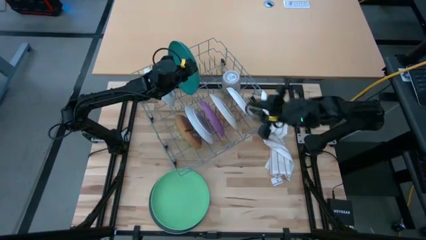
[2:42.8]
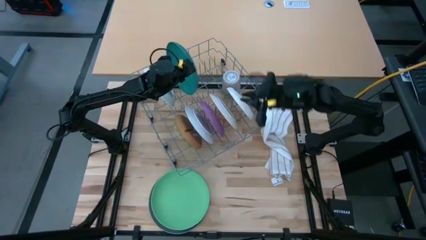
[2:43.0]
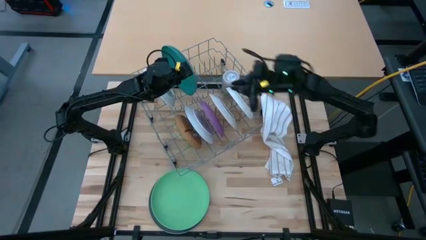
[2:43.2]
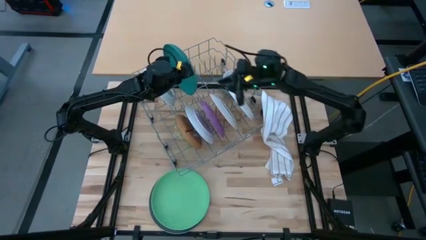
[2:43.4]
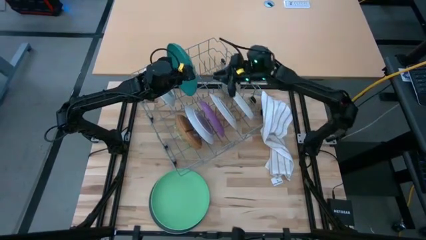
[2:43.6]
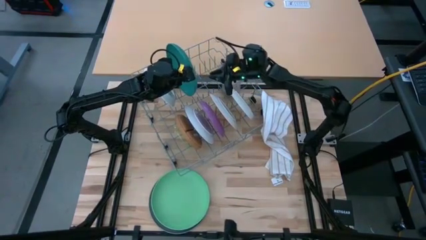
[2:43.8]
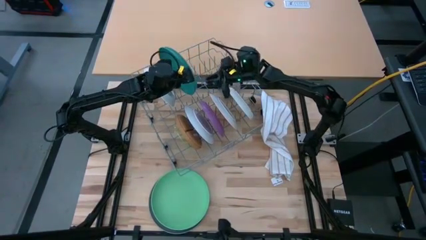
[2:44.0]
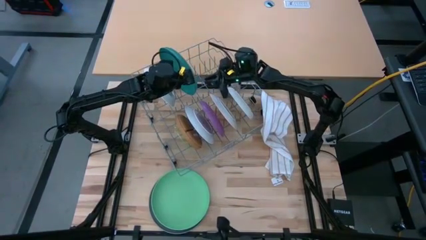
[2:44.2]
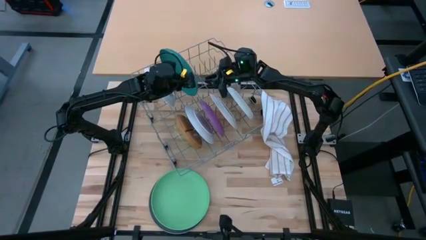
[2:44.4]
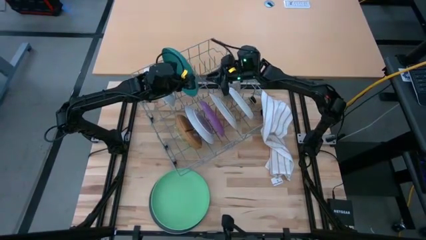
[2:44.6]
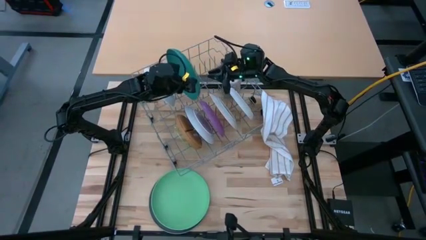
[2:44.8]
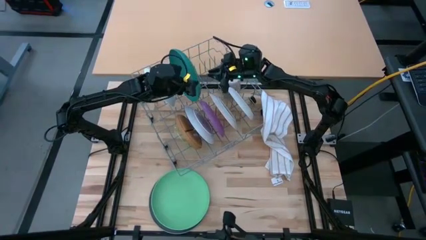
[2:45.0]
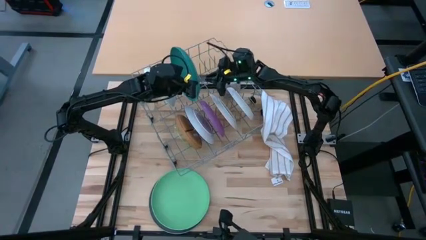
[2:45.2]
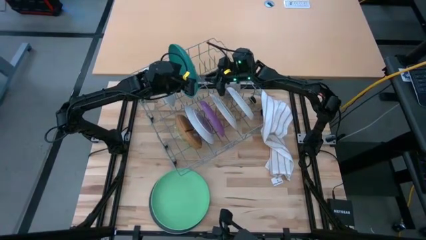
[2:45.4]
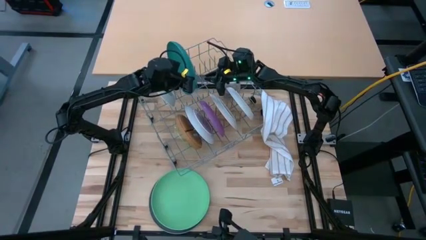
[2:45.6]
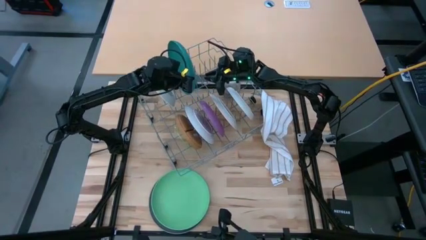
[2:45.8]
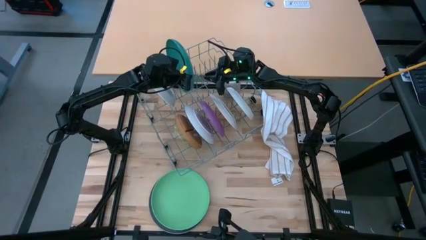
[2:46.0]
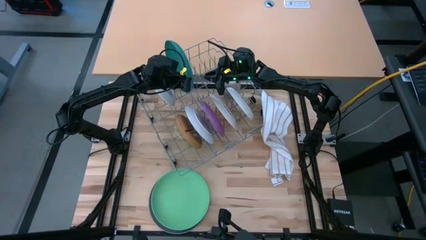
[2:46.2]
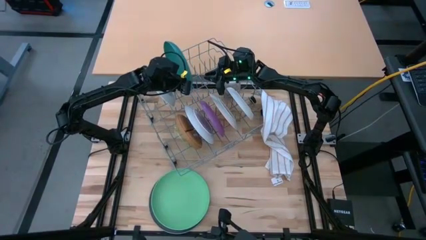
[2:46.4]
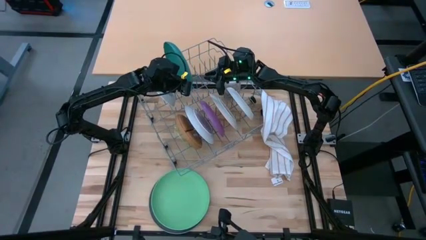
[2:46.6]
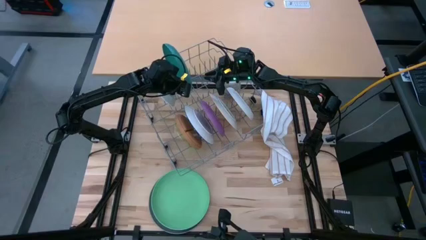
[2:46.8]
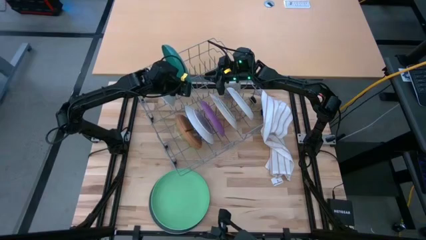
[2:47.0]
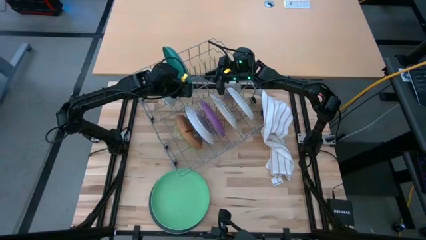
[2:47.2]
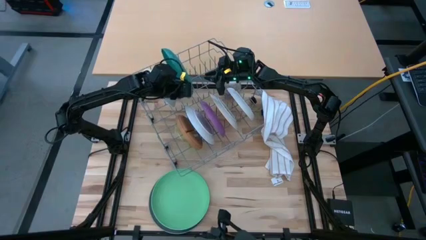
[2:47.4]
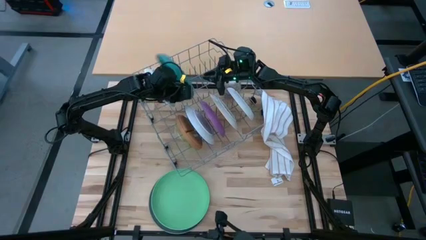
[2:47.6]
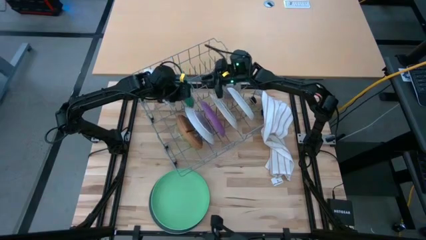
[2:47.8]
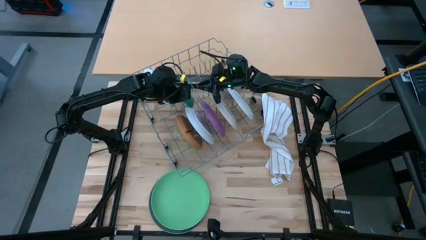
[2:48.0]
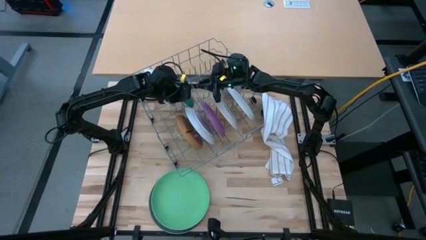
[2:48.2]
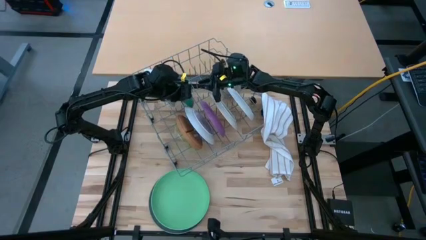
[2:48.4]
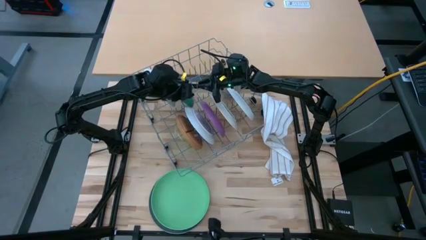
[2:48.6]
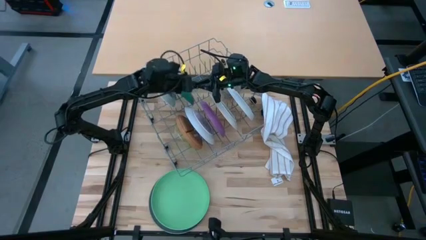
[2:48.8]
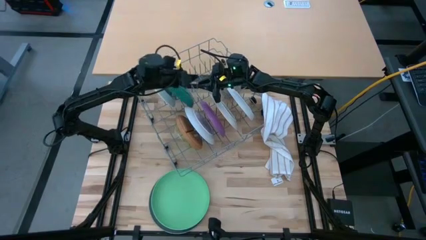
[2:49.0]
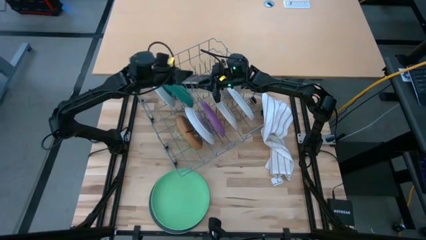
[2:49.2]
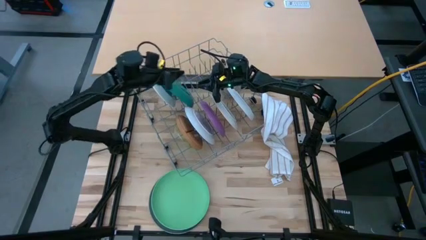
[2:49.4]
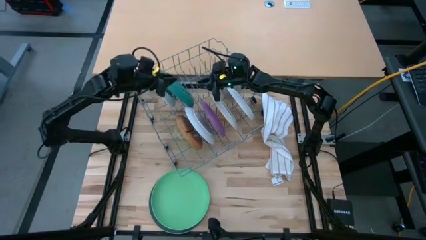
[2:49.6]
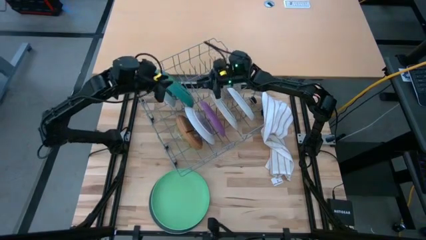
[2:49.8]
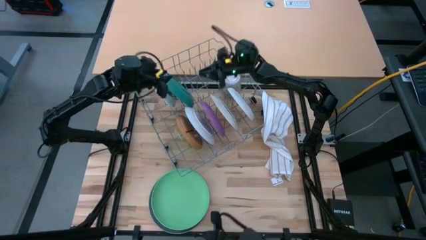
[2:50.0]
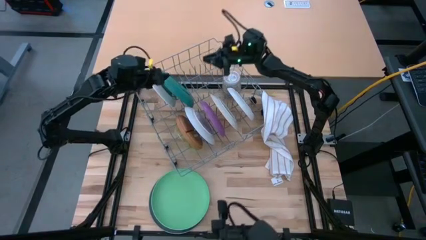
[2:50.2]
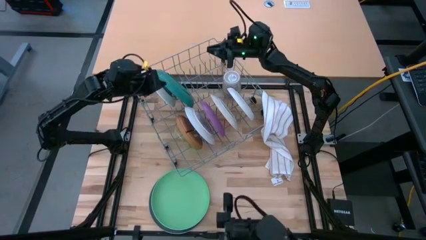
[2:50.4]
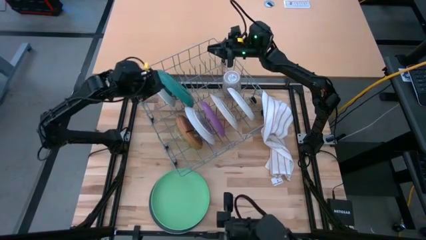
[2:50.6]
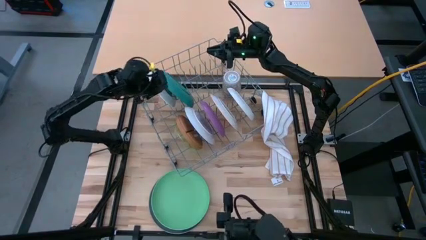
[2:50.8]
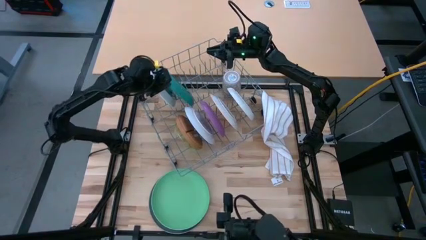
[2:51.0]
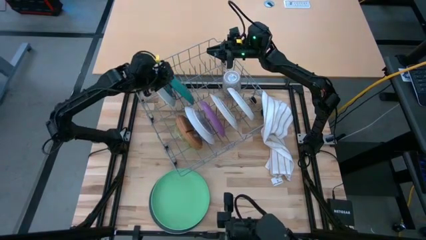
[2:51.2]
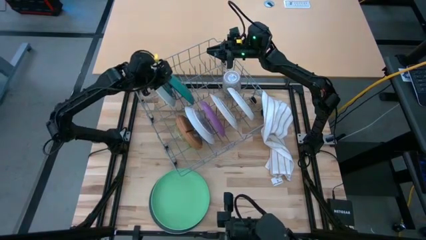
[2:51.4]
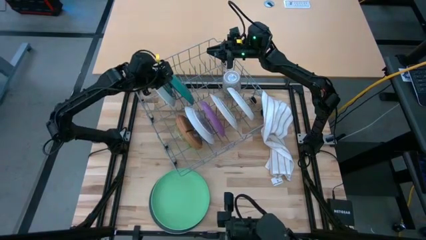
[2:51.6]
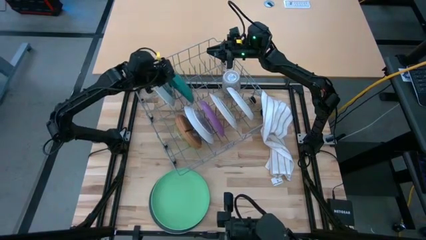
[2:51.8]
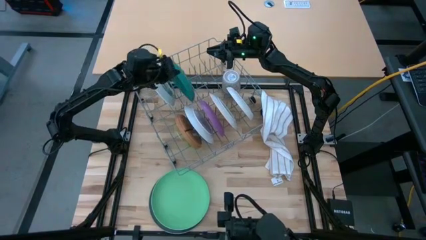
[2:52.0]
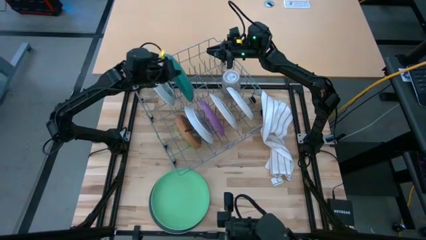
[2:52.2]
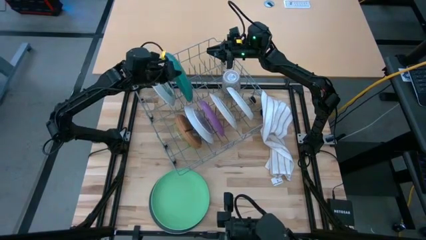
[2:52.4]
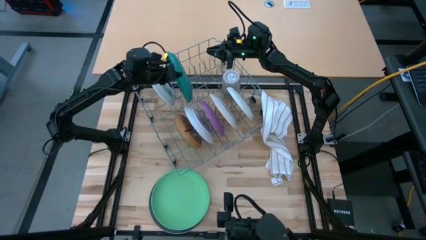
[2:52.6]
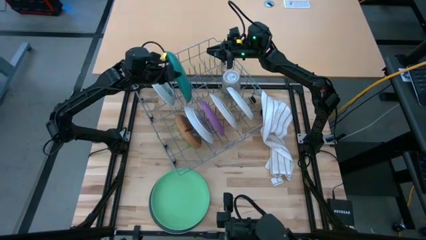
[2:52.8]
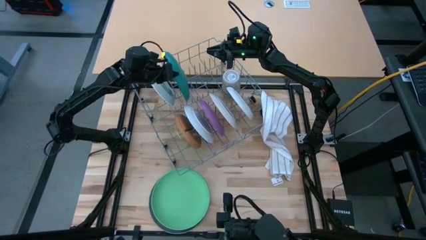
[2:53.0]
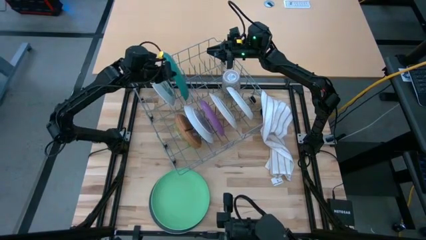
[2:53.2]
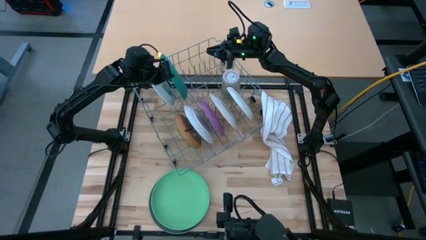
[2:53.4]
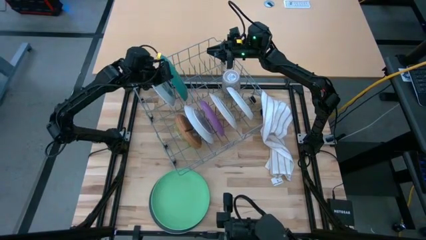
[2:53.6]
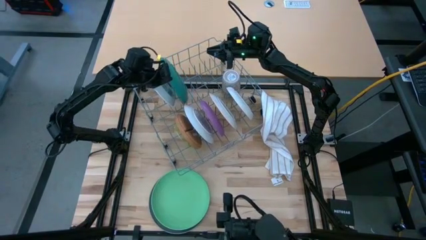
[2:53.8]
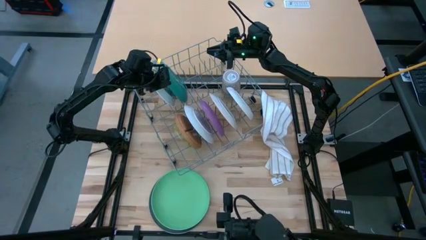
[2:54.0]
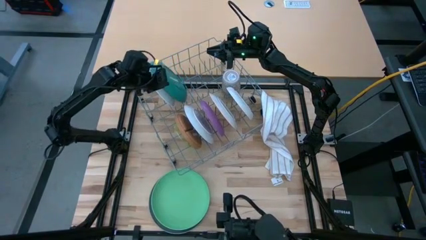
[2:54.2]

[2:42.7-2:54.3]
Task: Sort dishes
Put the blue plate into the dish rack

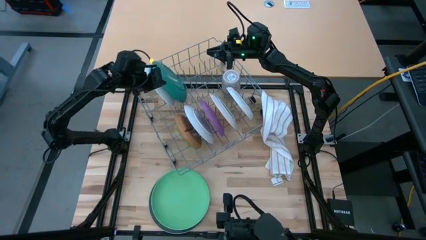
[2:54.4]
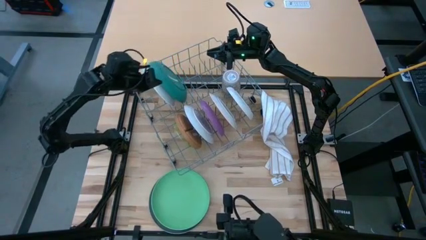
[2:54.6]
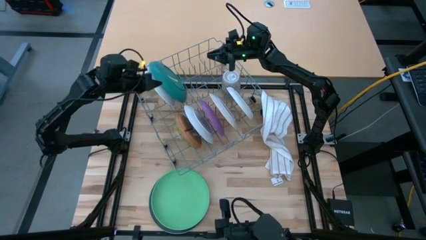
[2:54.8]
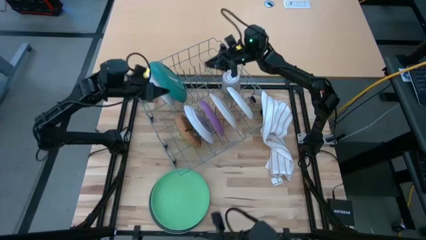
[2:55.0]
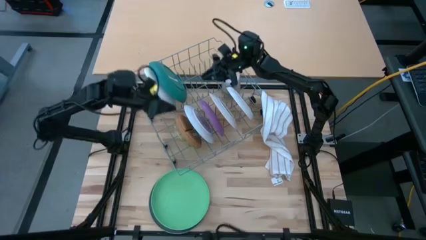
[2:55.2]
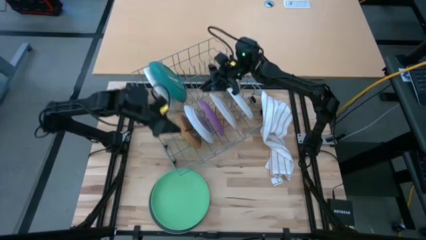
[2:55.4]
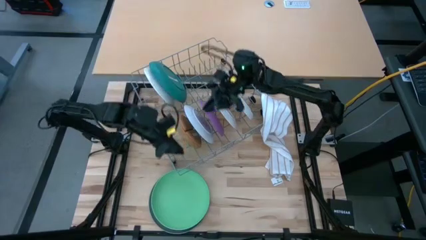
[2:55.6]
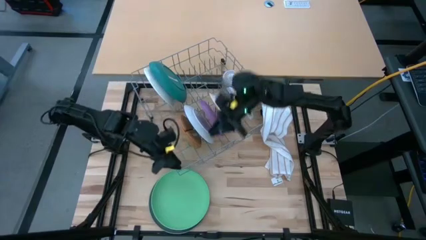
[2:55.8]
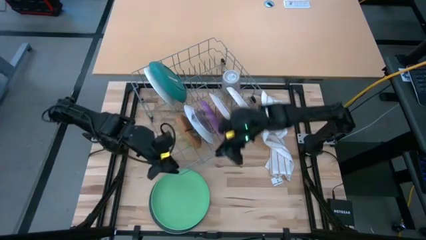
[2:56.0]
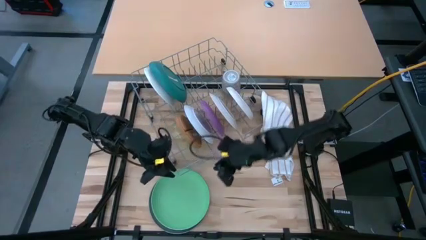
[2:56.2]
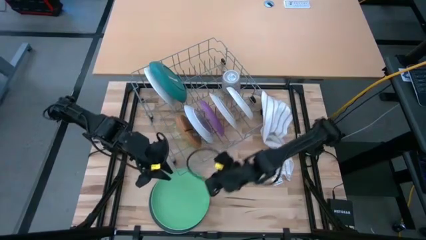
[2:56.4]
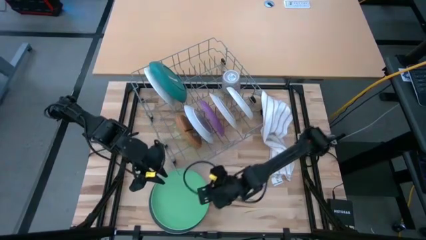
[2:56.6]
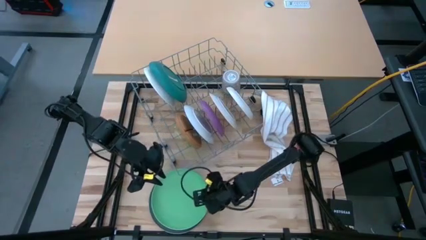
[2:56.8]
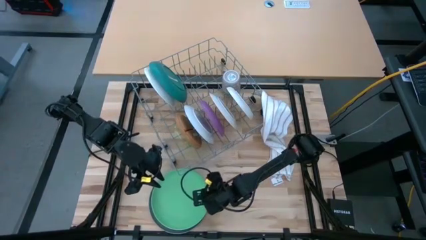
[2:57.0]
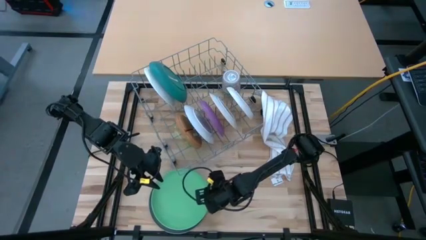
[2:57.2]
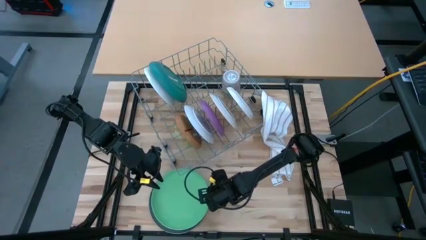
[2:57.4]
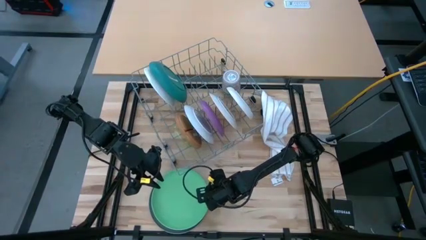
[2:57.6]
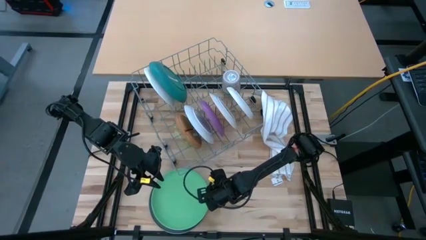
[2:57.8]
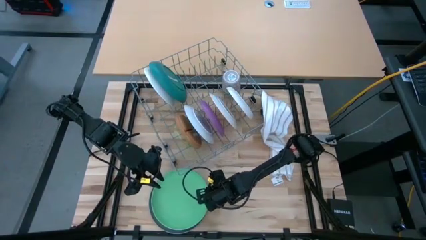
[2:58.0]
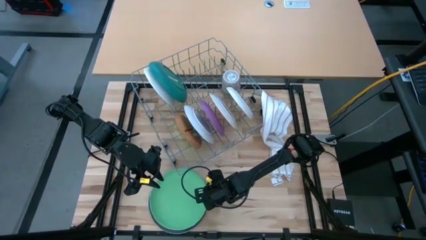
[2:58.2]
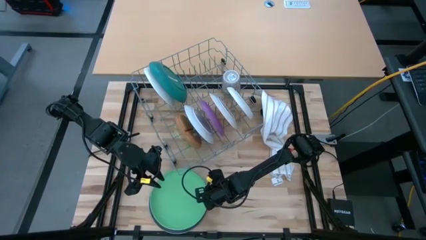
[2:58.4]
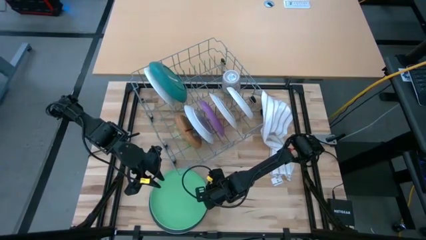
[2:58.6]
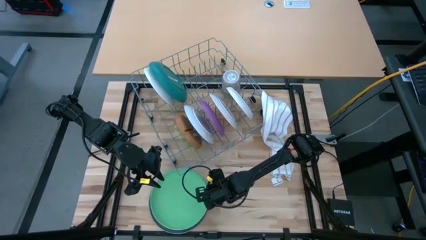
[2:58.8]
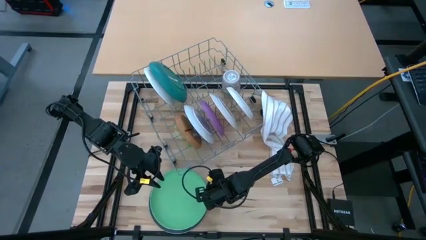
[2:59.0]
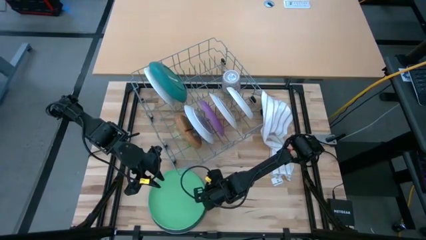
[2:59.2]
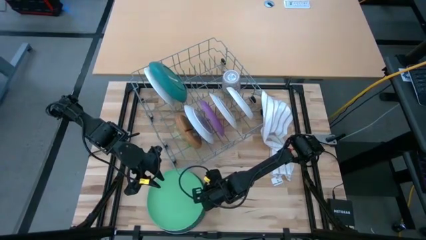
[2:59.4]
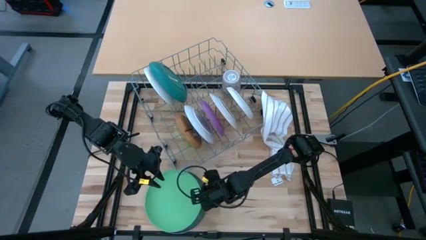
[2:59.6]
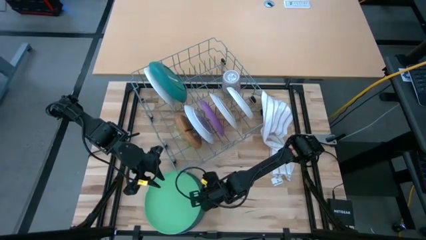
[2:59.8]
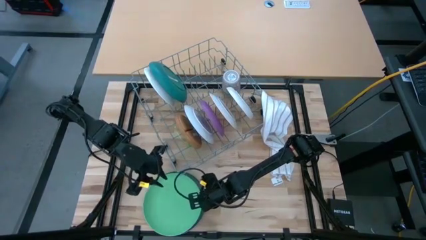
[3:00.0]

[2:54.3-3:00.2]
Put the light green plate into the dish rack
